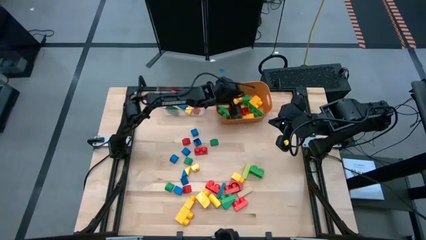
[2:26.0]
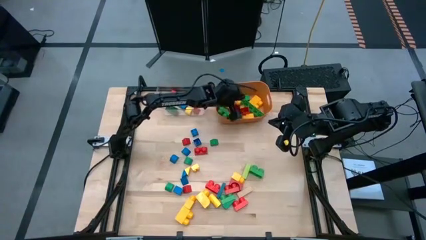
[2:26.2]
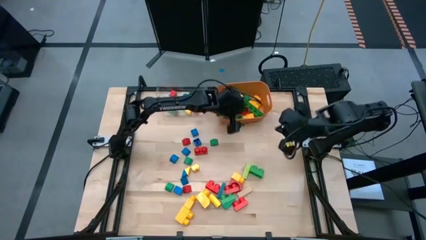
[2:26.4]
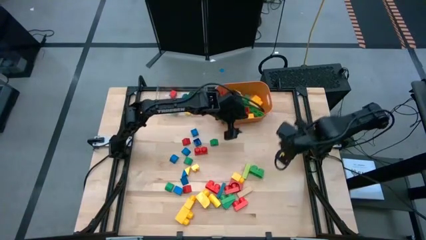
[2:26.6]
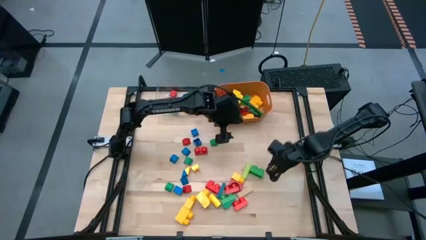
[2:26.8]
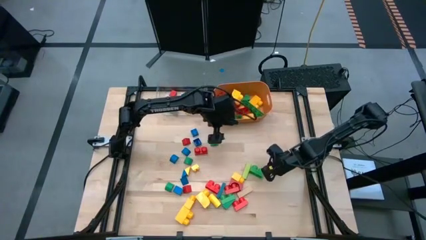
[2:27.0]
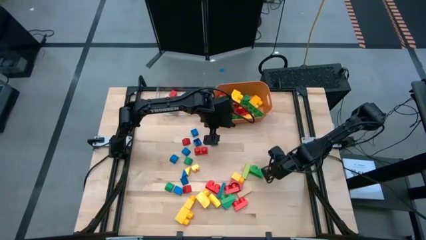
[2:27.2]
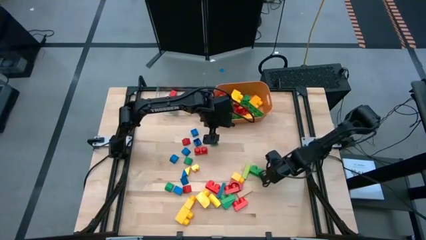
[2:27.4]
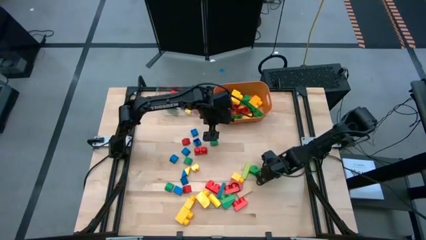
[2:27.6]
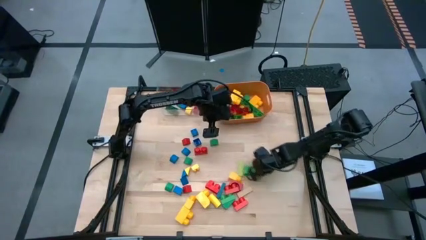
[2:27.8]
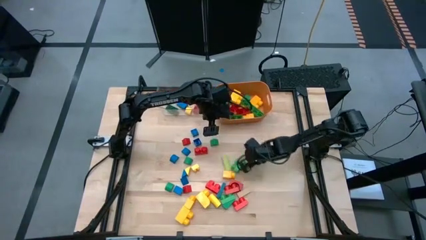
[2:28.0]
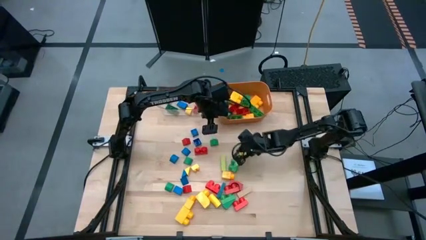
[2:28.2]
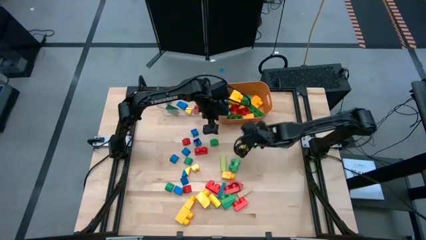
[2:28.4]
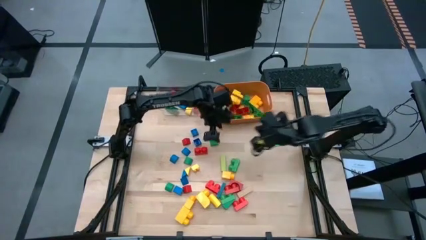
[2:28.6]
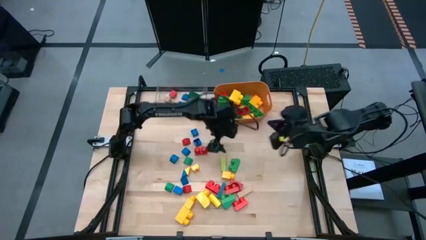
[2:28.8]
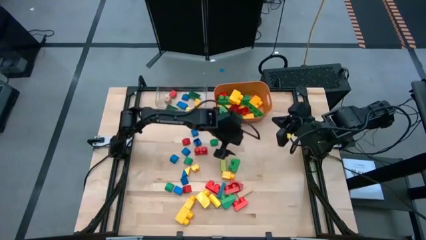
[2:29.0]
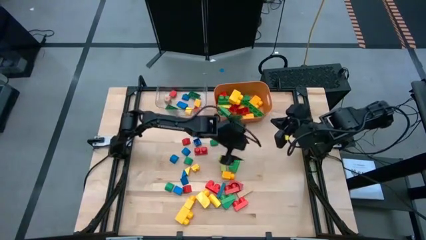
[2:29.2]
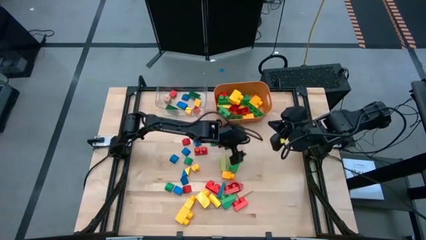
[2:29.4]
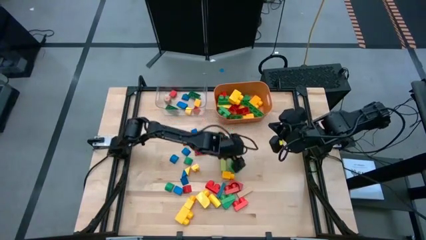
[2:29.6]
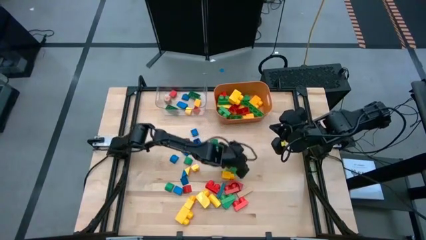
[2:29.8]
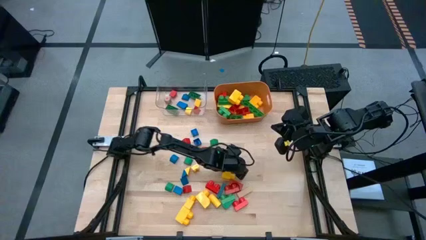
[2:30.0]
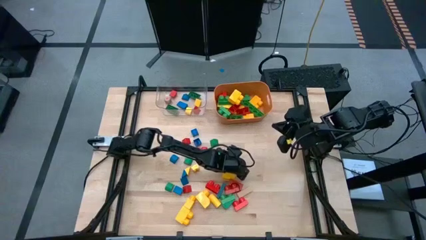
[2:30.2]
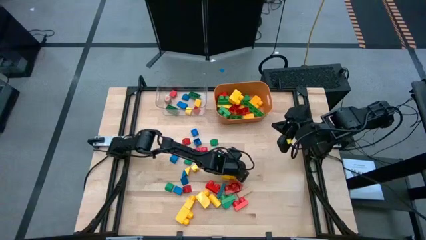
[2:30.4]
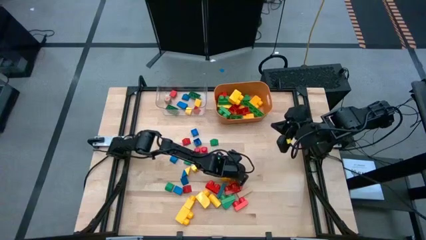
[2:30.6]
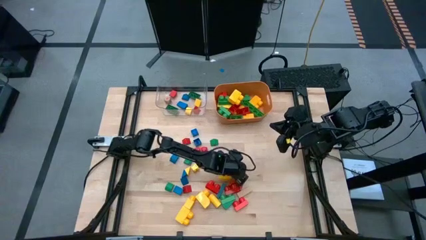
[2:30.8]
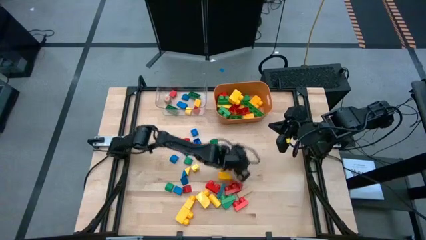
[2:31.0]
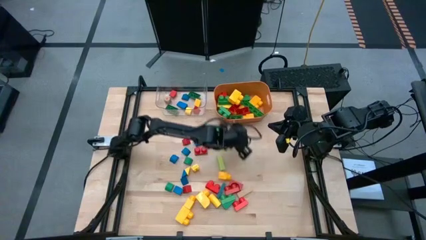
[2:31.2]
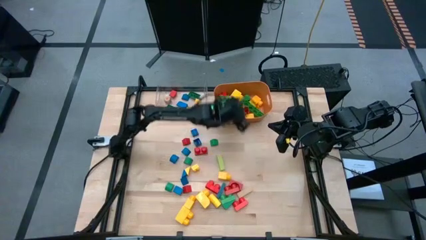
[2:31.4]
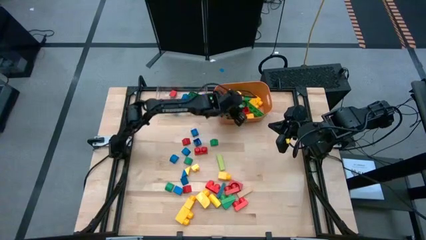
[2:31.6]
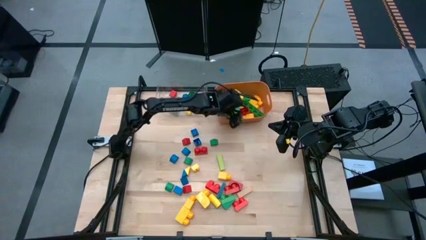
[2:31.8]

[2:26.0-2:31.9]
Task: Sort blocks by size
Put the big green game piece into the orange bin

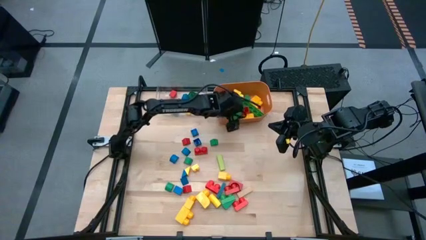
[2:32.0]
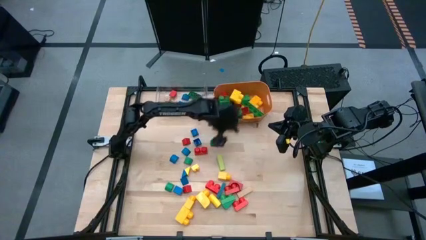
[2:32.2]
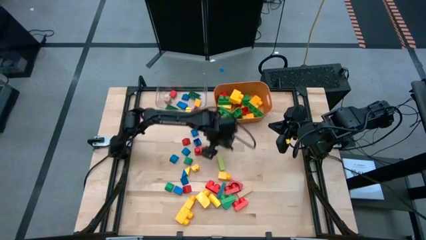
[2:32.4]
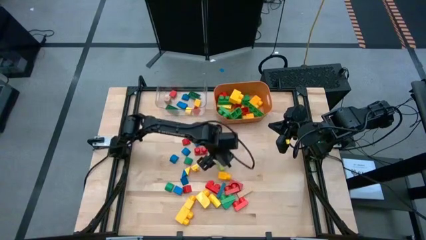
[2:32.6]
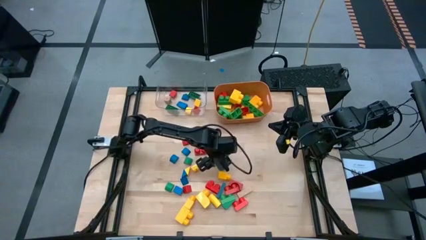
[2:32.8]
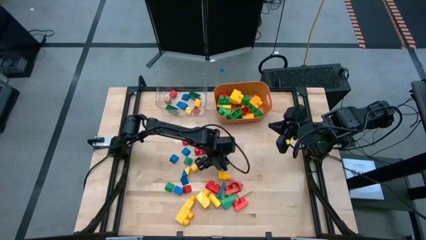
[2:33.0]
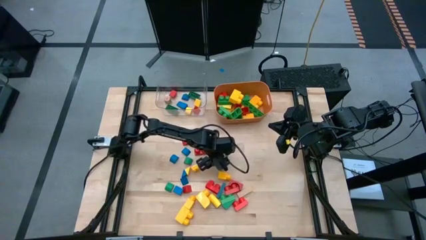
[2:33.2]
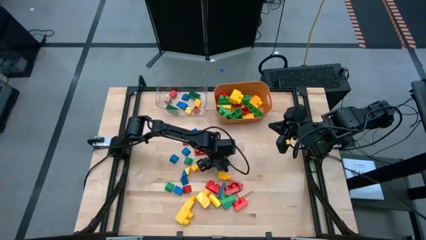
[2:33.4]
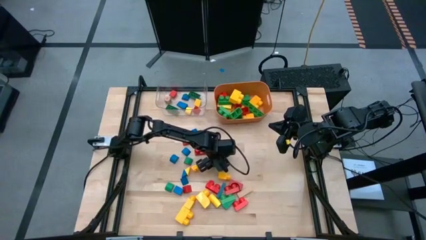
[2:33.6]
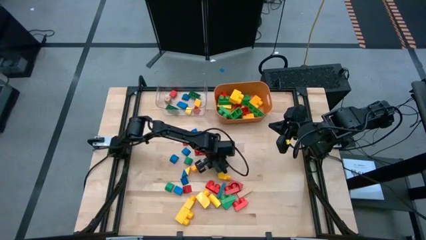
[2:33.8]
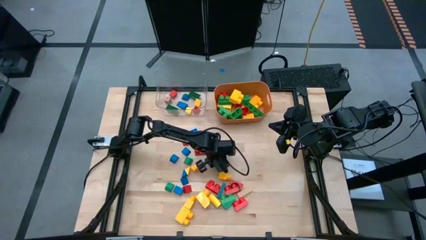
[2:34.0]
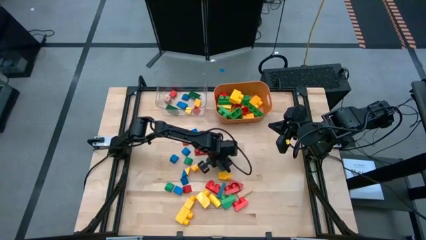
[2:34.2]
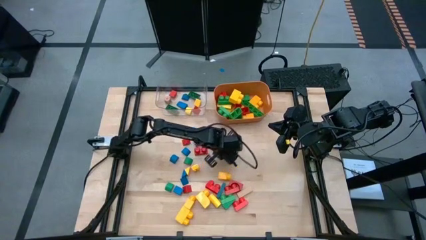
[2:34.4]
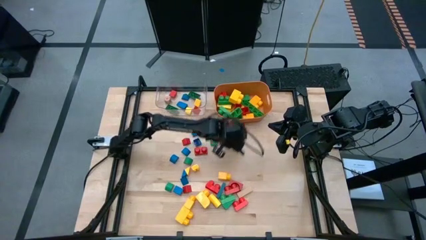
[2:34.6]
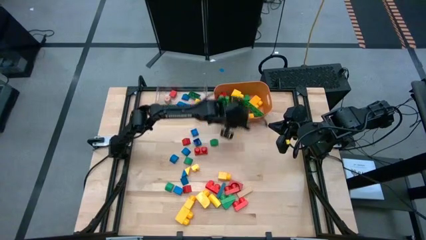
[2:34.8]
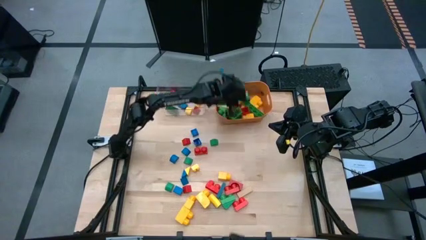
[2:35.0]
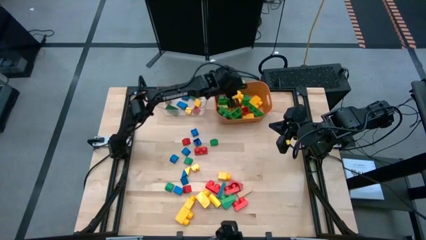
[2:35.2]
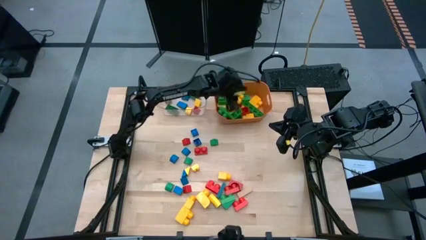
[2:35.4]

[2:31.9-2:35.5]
Put the big light green block into the orange bin

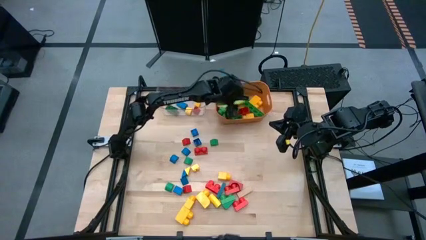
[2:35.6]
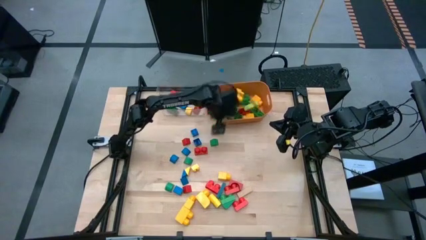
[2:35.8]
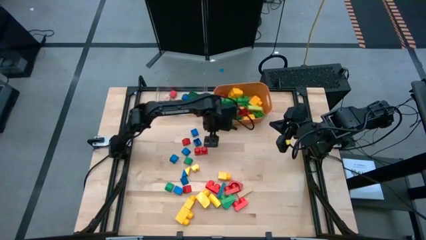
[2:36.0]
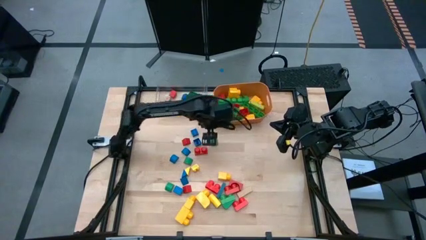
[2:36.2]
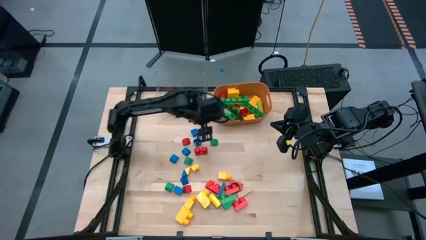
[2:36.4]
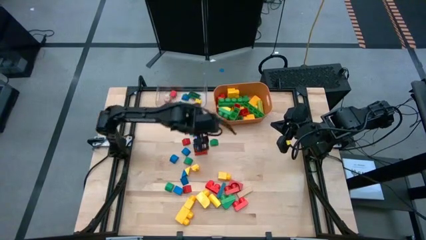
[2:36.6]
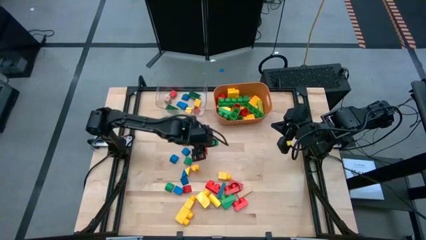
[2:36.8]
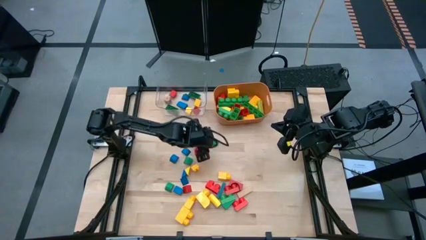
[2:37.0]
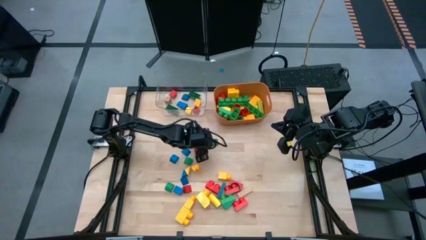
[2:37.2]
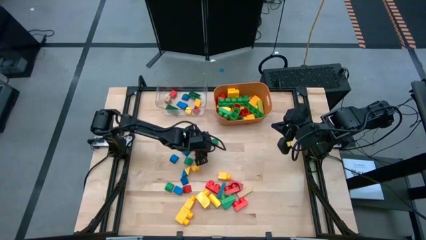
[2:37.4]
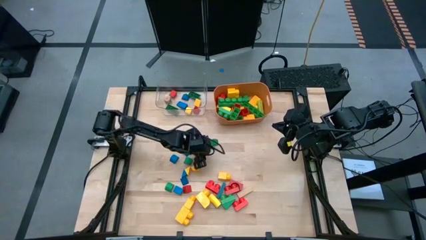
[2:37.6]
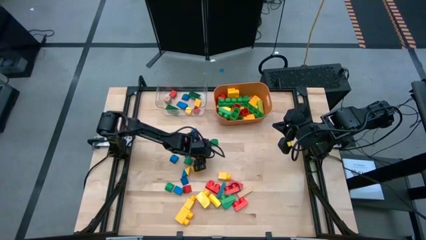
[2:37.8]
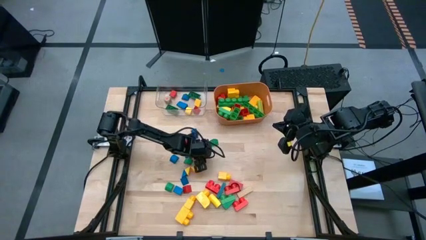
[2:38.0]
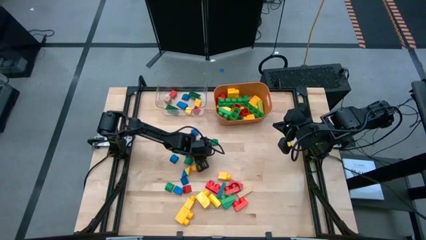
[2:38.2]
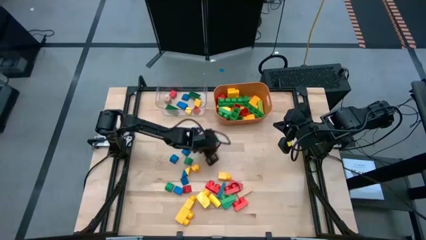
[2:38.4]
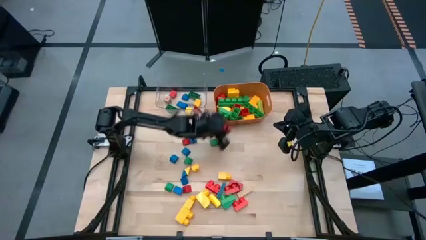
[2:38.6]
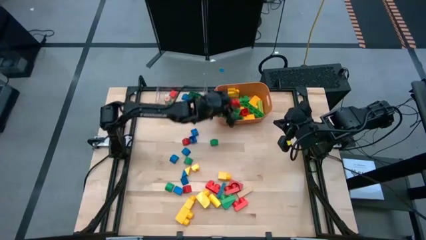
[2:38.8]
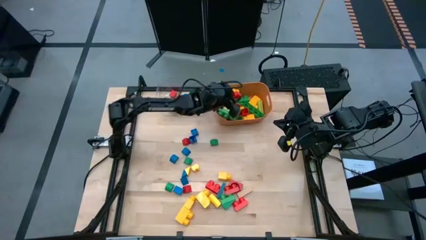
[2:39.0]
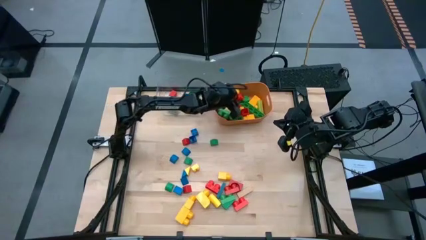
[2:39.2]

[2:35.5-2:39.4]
Put the big red game piece into the orange bin

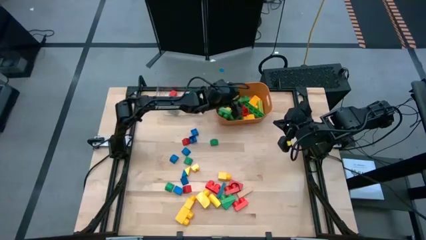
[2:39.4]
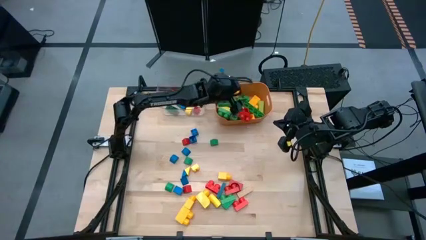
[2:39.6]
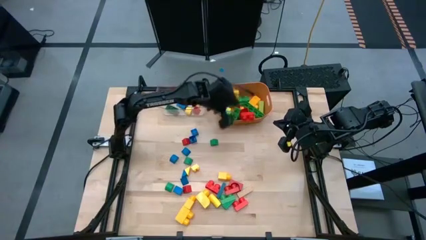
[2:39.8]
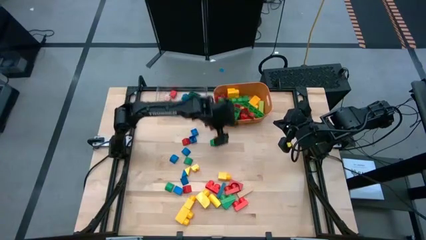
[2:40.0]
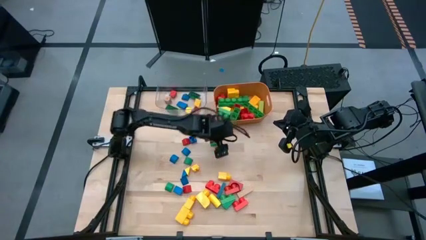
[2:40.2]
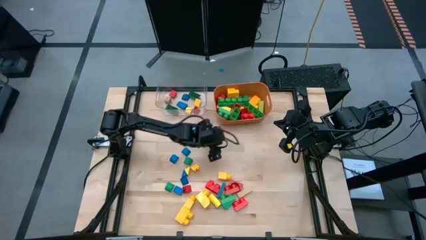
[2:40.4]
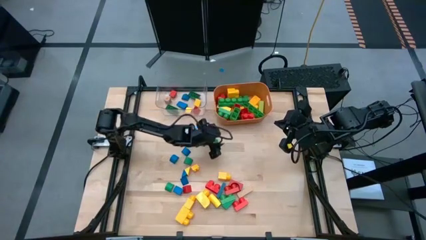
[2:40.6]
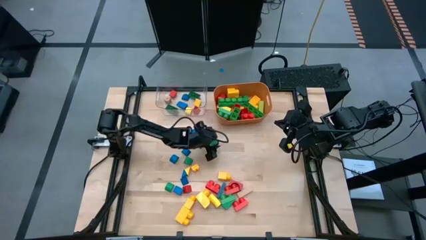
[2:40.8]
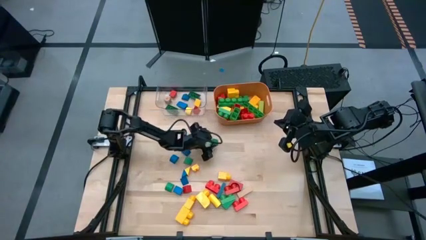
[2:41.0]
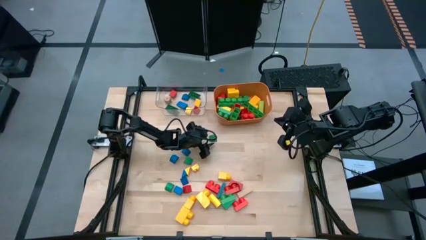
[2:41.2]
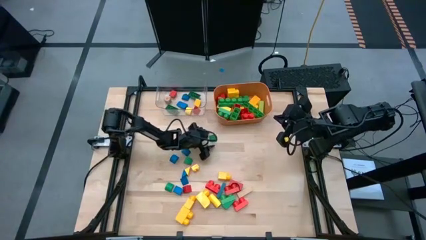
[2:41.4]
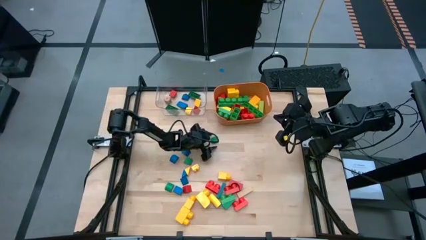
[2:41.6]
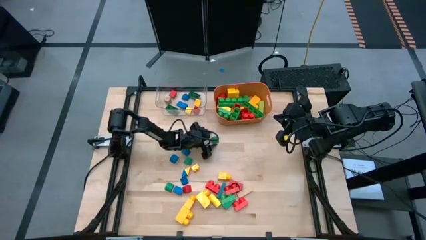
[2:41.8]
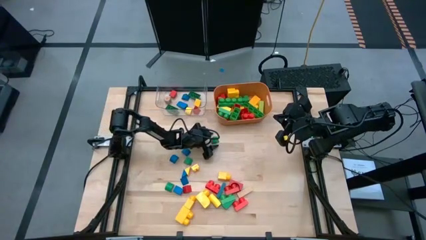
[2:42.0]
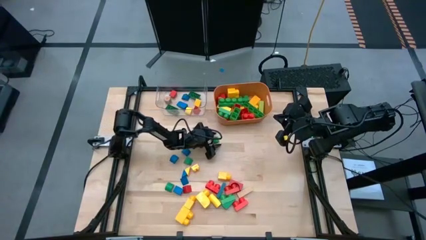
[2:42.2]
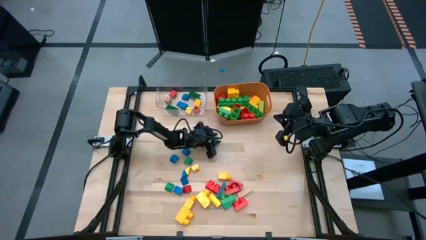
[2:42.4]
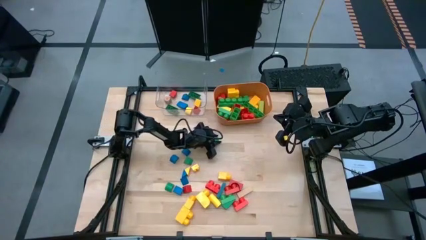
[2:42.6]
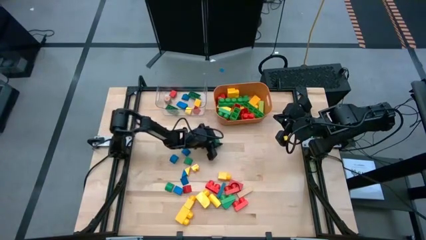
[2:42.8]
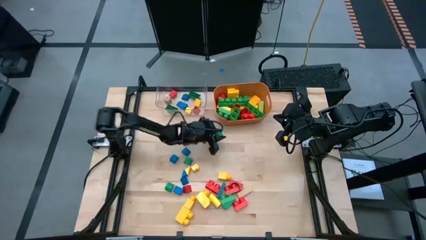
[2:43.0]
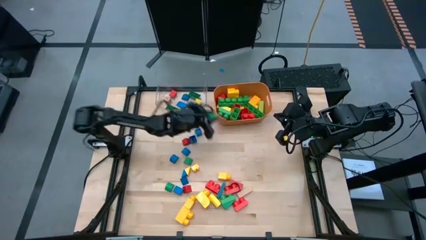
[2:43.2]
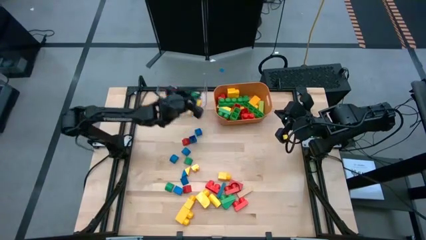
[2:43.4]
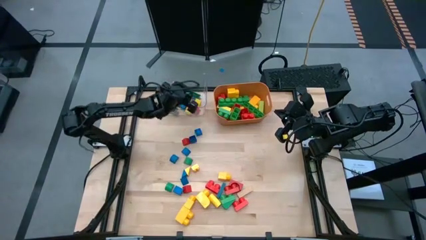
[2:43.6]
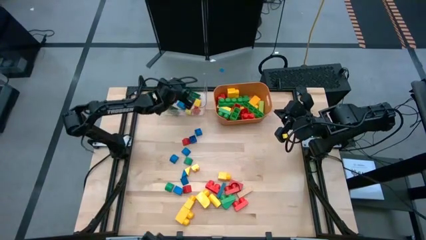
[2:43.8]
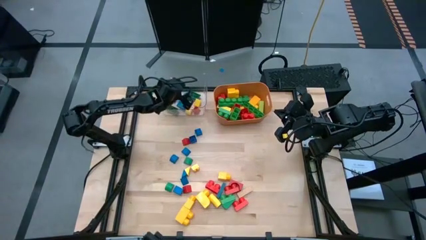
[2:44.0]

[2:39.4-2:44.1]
Put the small green block into the transparent bin
